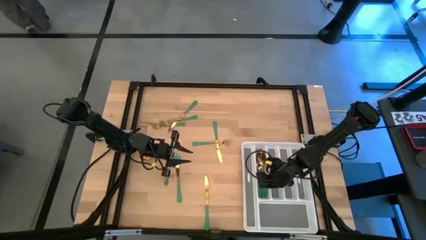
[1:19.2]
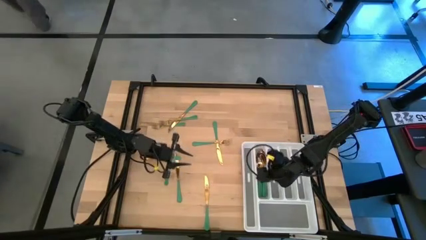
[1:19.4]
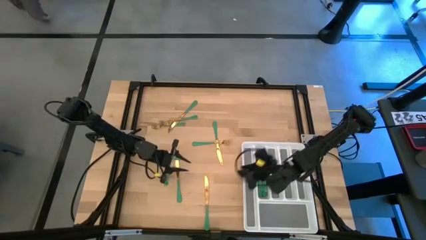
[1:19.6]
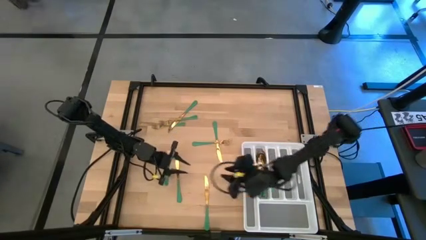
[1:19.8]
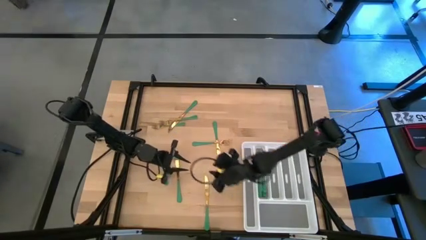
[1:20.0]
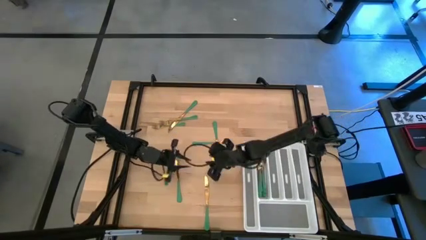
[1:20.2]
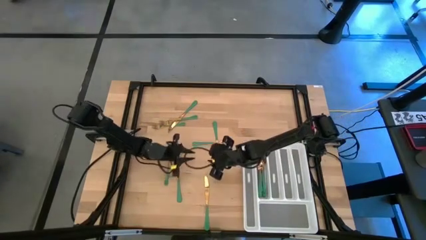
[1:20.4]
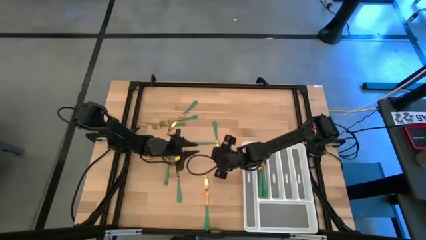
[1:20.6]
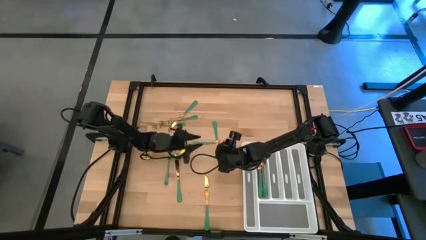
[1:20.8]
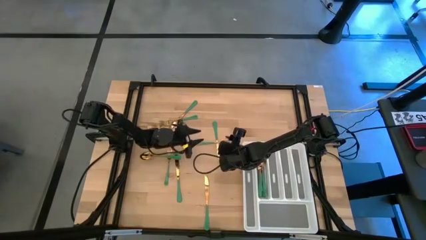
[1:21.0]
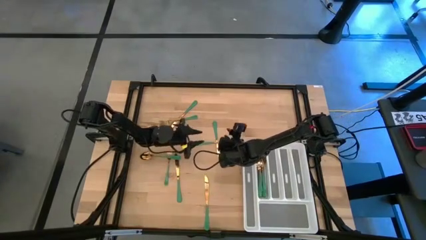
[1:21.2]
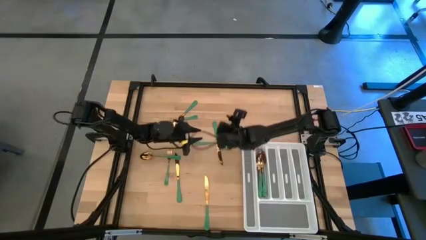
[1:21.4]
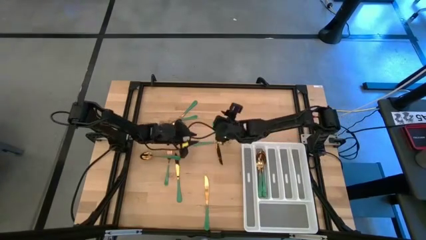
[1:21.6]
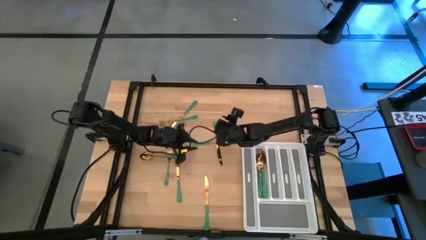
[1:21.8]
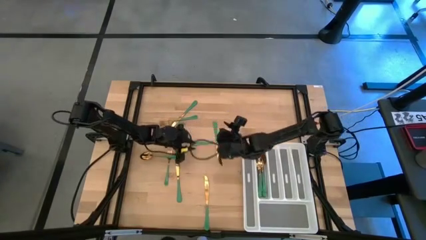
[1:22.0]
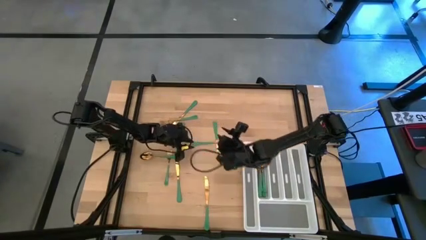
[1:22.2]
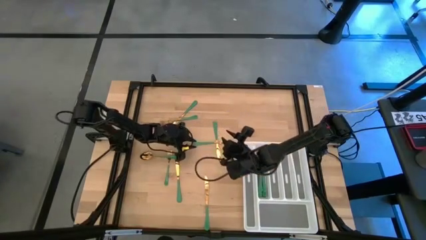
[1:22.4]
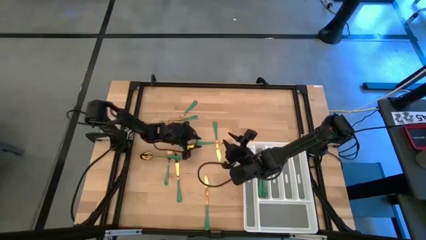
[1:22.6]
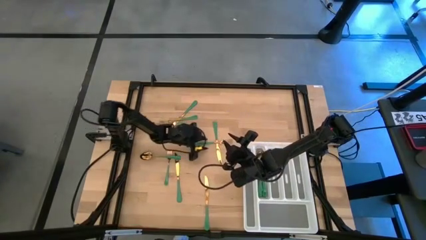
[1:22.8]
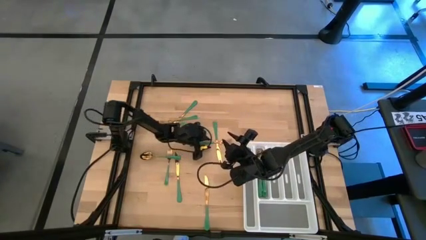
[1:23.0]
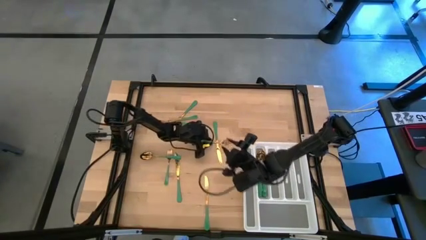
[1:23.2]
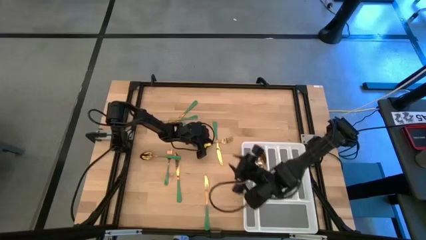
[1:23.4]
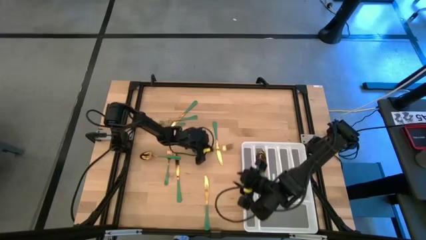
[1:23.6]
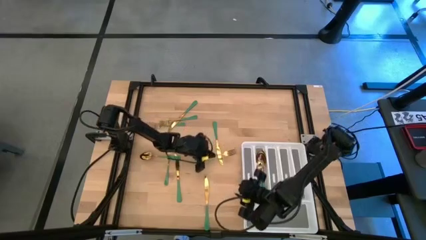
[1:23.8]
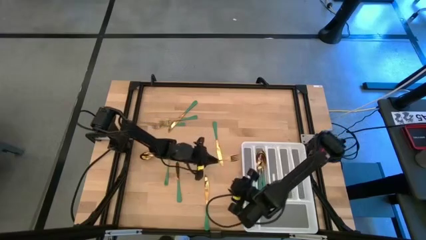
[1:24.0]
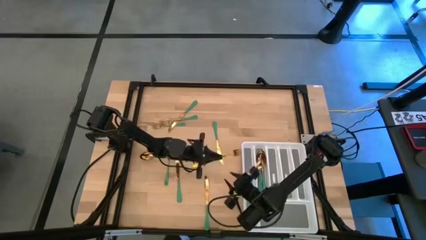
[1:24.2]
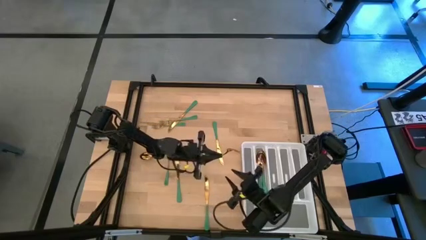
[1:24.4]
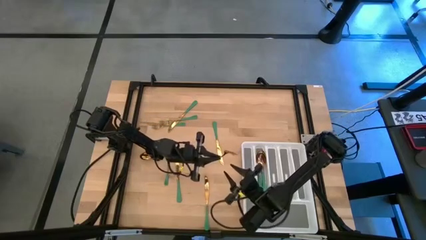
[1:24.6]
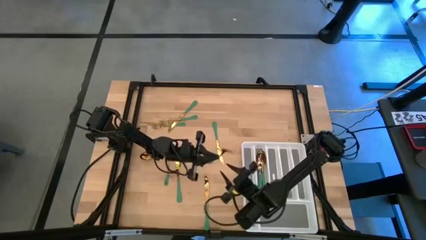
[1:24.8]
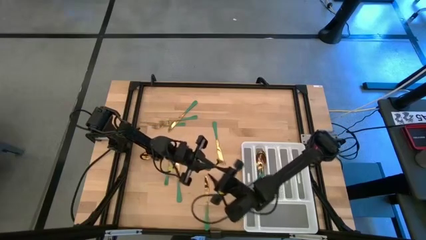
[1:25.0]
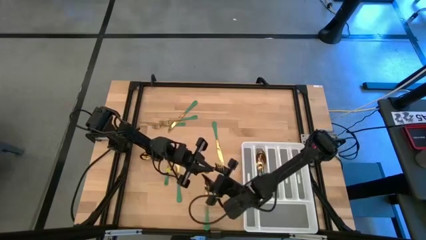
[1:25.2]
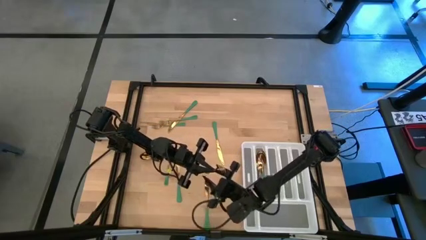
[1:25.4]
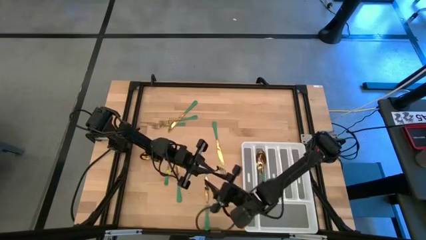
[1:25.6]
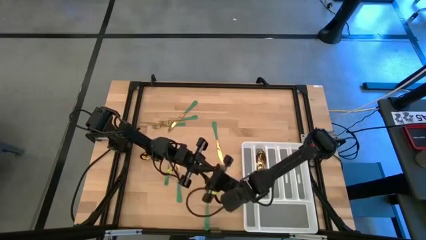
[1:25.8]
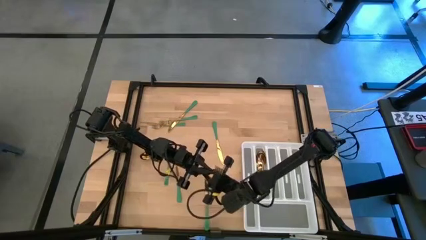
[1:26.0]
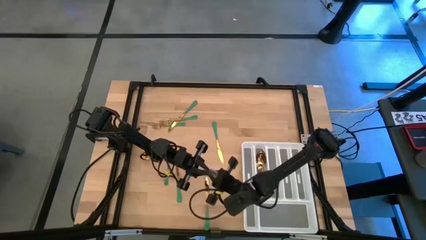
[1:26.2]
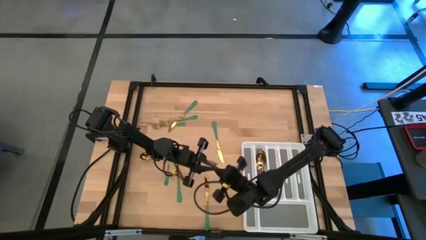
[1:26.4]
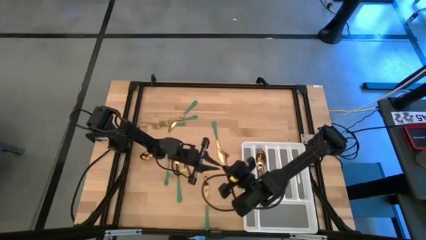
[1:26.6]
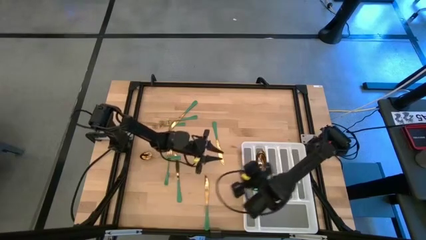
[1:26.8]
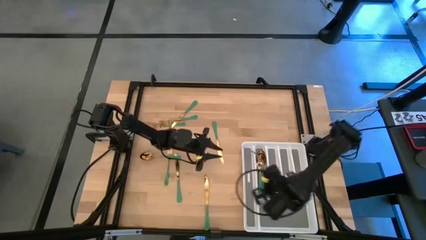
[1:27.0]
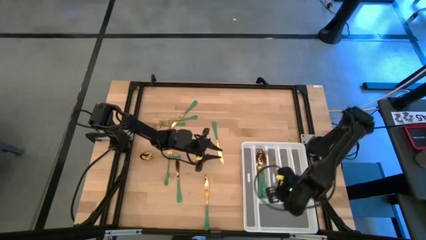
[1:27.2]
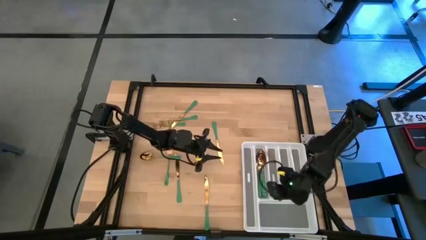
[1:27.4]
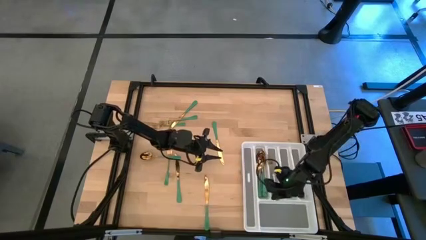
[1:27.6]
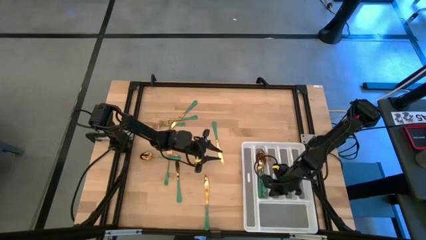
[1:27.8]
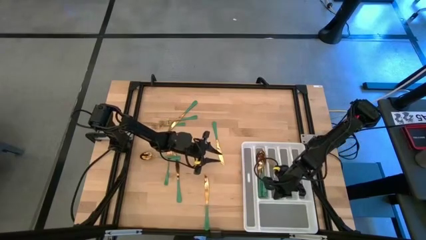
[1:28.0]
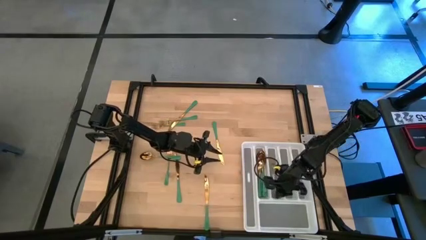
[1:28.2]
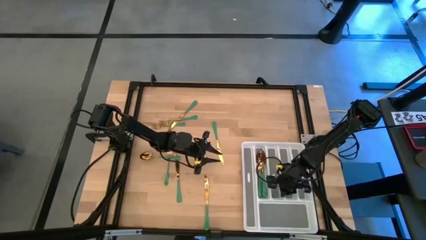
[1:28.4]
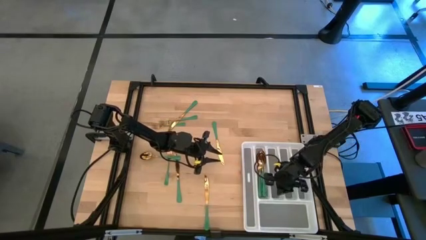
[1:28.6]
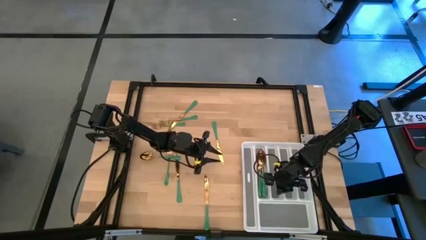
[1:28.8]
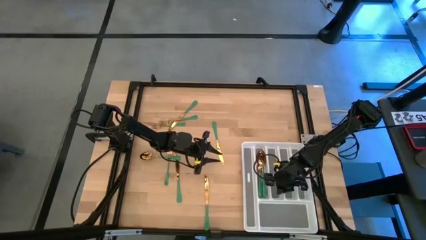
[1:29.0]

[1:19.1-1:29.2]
Task: Sort silverware
Put the middle right green fork into the silverware rack

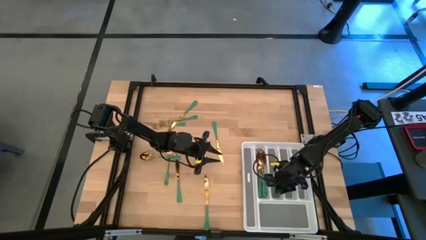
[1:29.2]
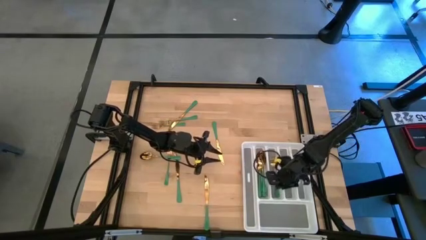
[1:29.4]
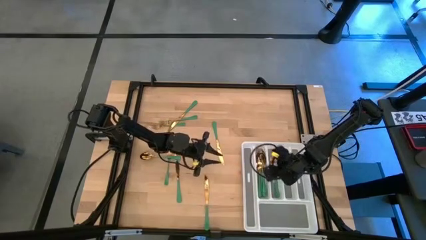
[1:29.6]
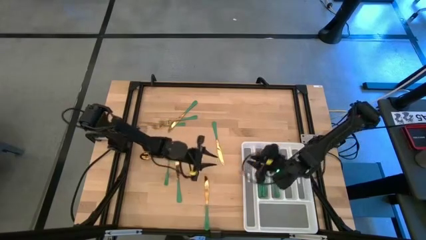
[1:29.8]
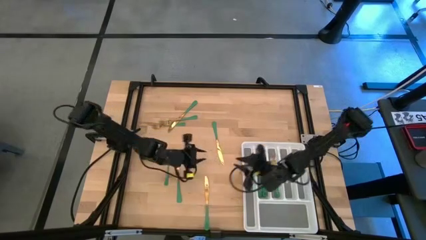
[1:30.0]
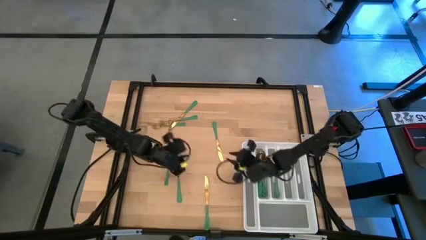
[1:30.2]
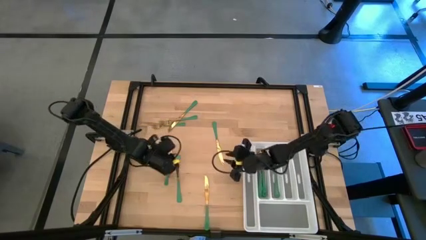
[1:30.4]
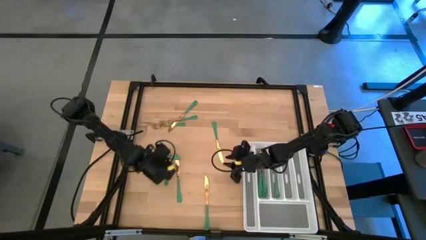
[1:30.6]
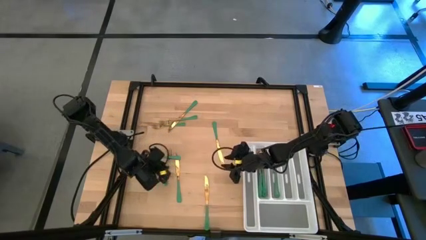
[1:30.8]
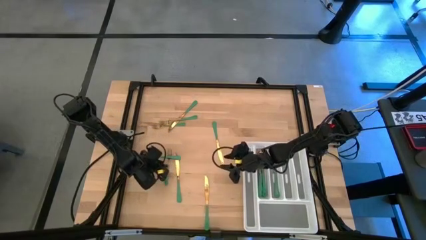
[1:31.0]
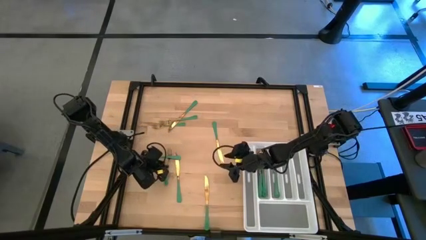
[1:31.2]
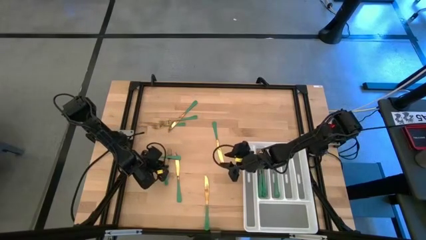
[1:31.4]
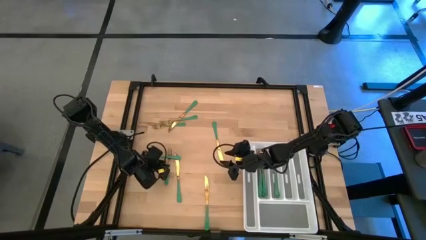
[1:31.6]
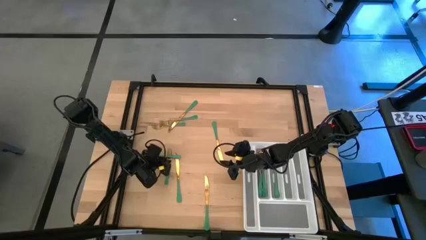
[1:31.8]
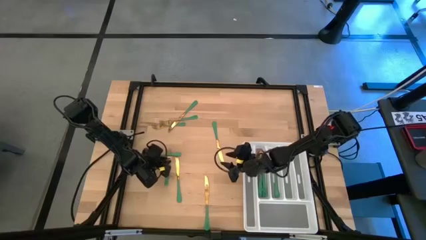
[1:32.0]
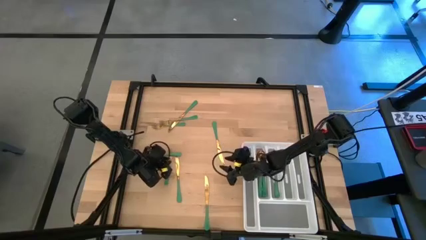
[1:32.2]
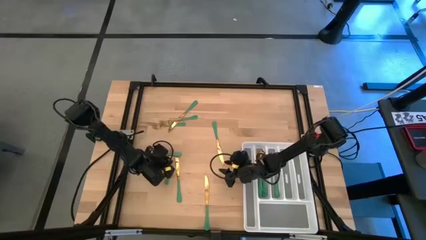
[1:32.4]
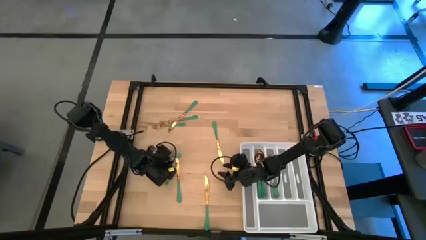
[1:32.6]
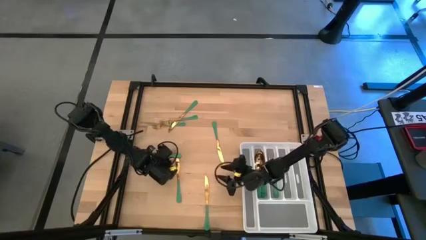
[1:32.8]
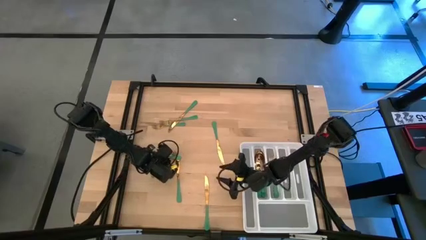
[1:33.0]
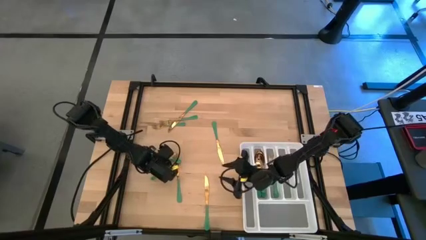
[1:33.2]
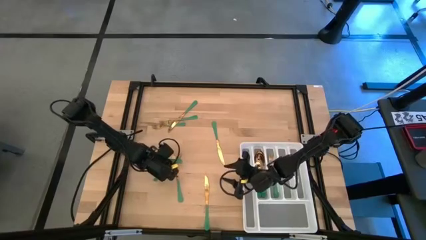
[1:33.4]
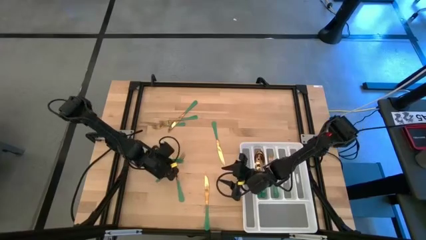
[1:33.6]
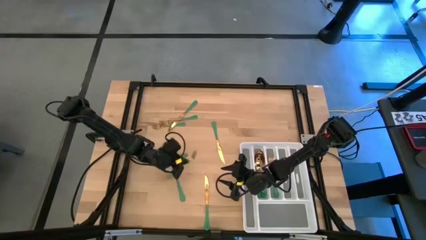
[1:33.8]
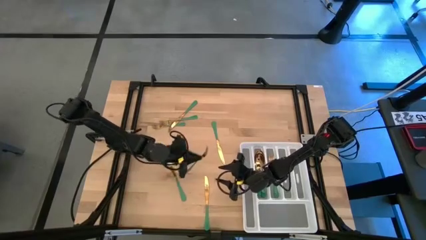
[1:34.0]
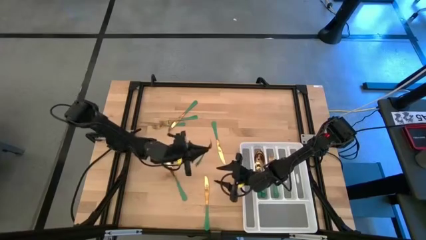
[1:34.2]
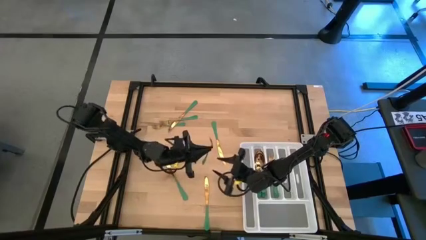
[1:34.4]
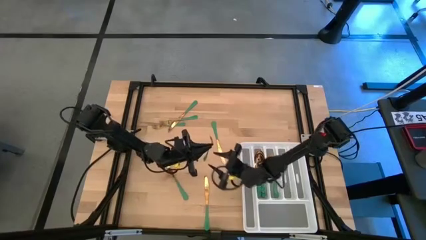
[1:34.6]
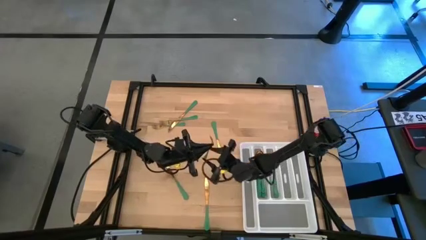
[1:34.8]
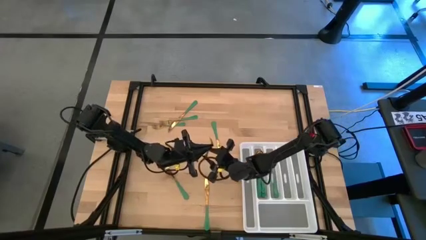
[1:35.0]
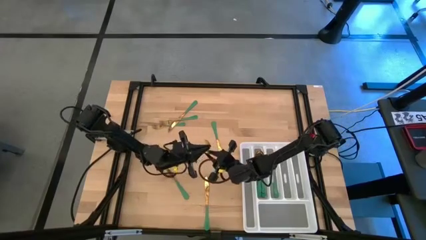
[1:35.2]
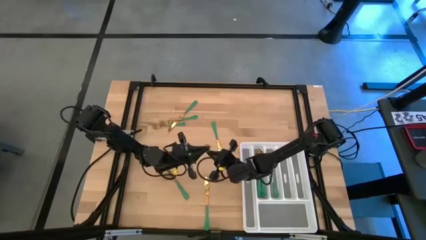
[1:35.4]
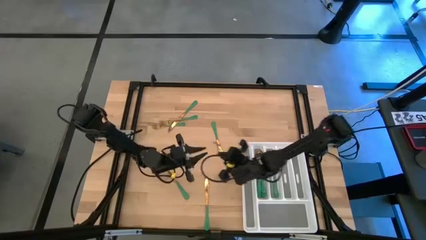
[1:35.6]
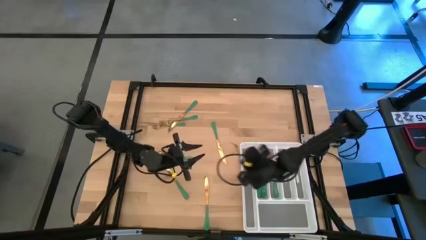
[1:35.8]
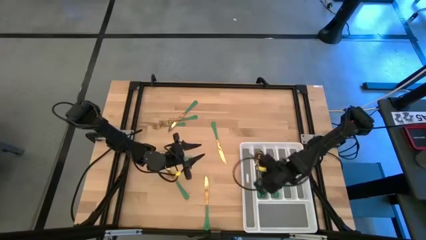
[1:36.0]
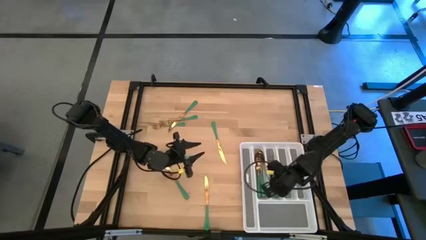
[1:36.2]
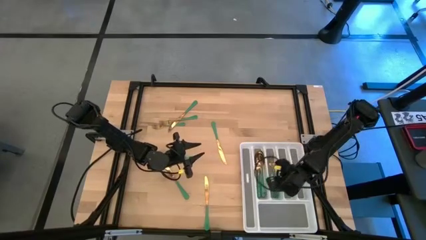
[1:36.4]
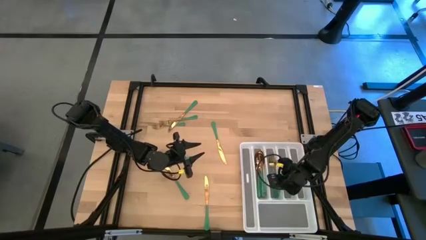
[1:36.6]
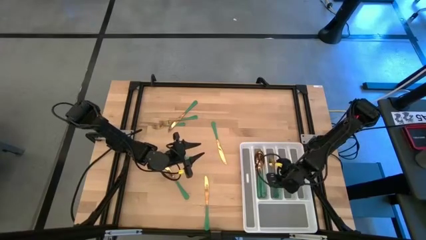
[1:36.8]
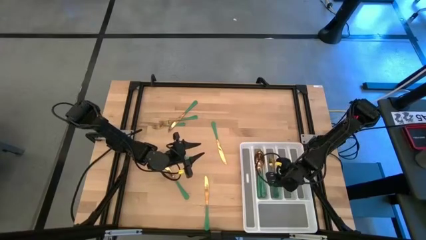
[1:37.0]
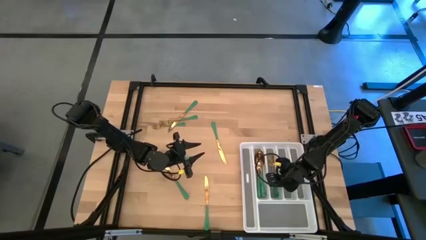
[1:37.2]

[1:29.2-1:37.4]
Put the bottom center green fork into the silverware rack
